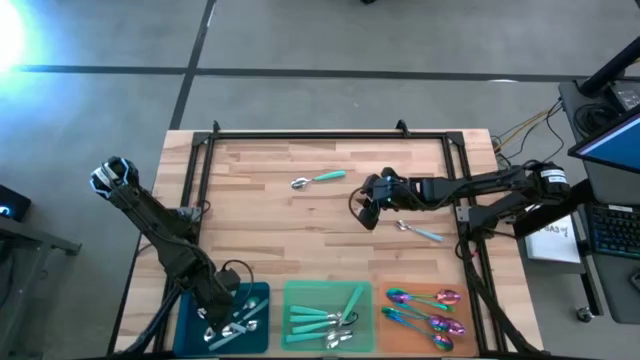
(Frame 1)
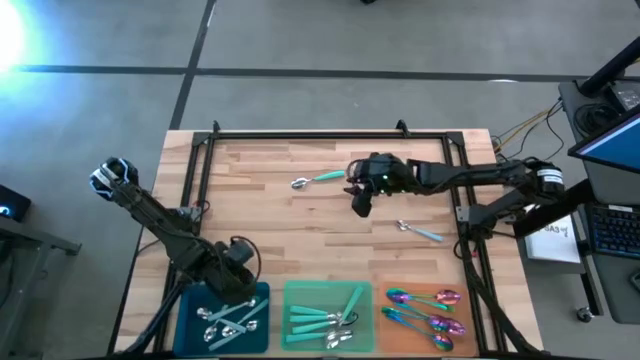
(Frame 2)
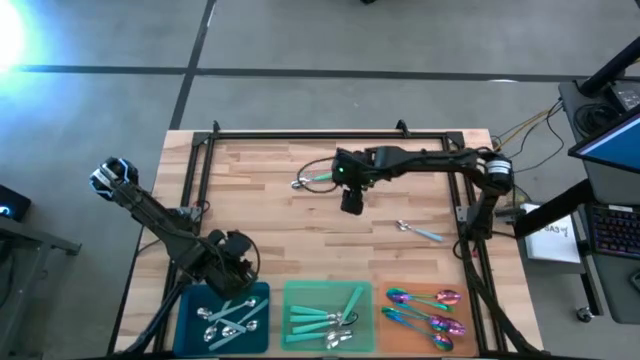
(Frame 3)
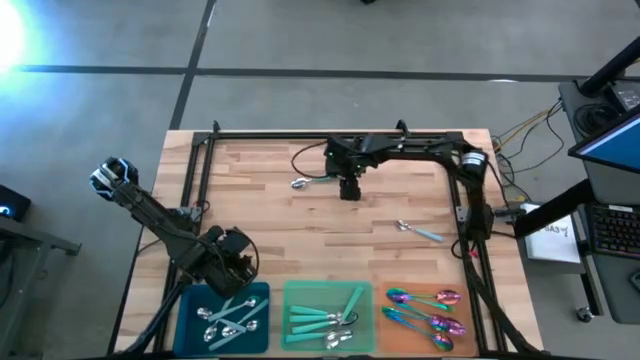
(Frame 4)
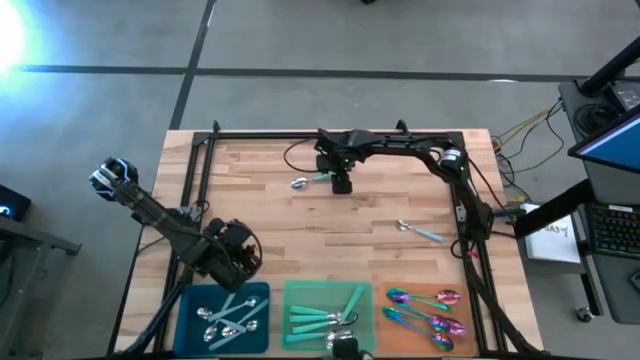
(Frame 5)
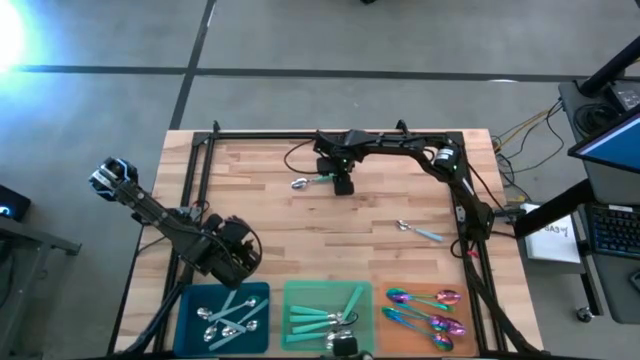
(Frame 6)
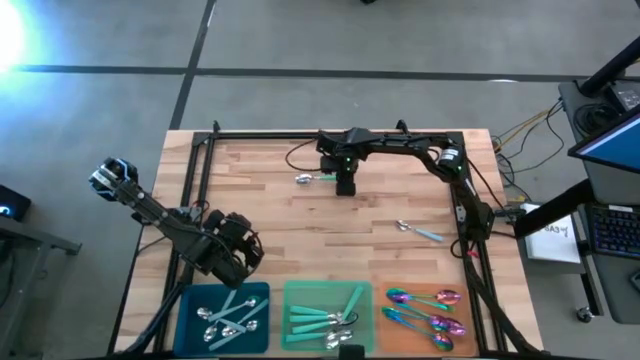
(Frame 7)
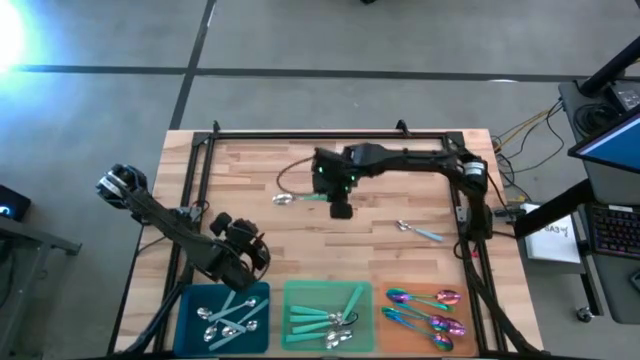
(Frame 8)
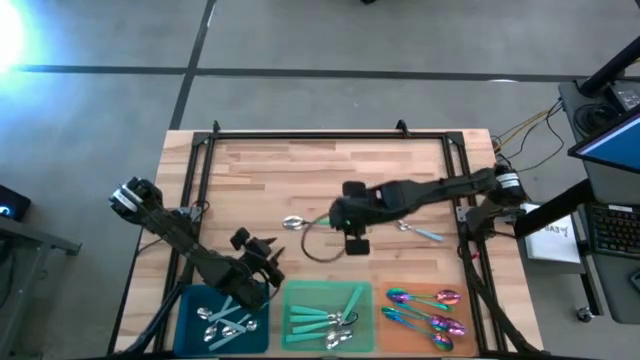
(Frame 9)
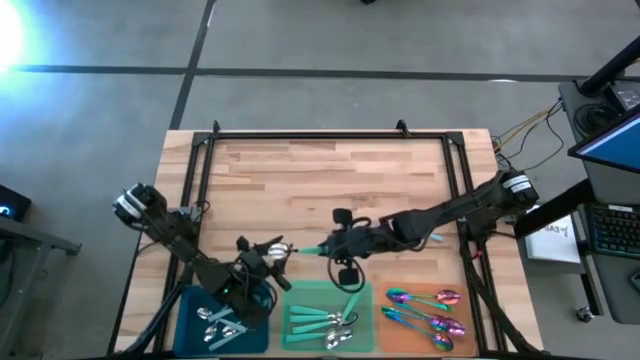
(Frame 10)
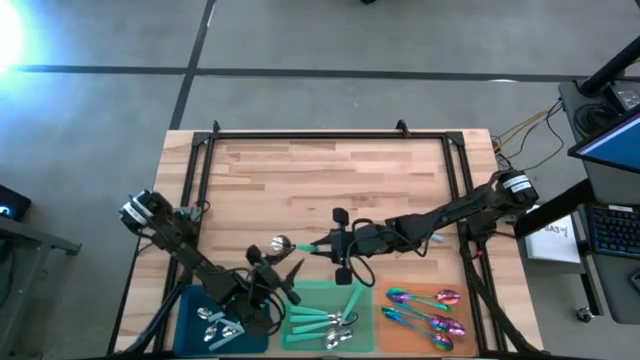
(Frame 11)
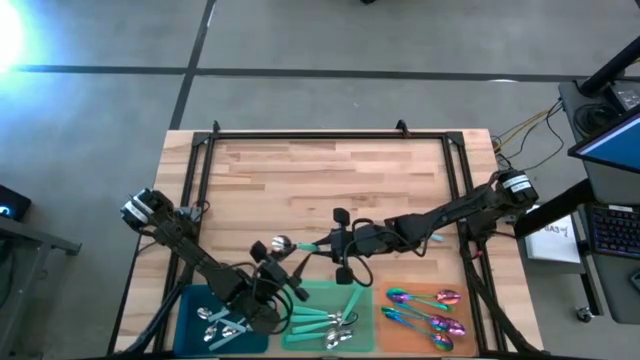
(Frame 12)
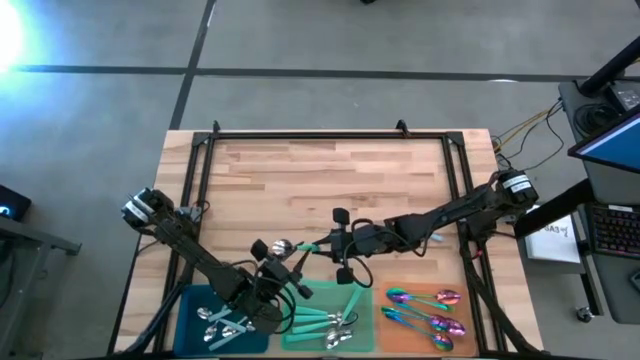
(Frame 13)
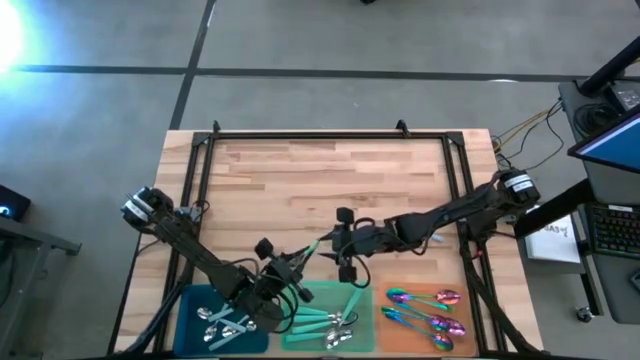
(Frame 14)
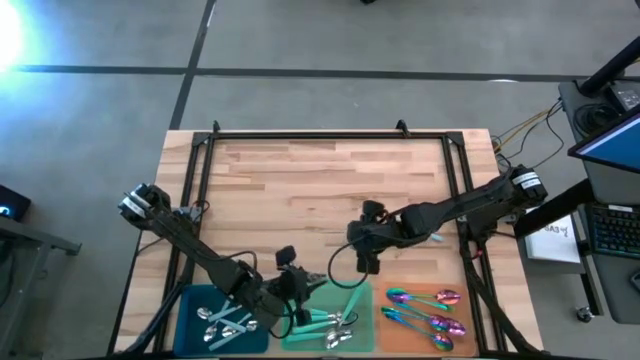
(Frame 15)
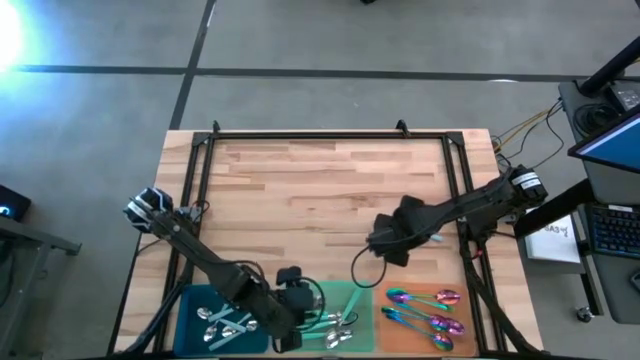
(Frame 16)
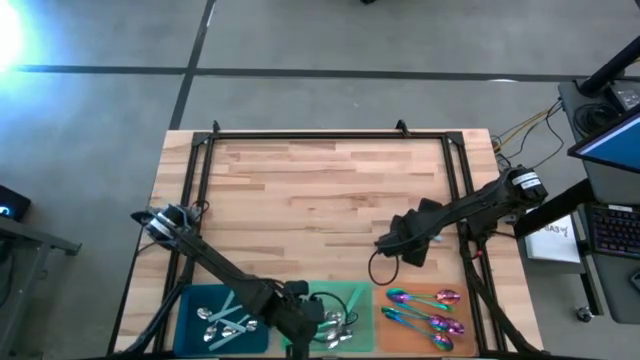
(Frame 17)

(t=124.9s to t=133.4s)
Task: Sort silverware by color (type)
Put the light green spoon into the light green bin

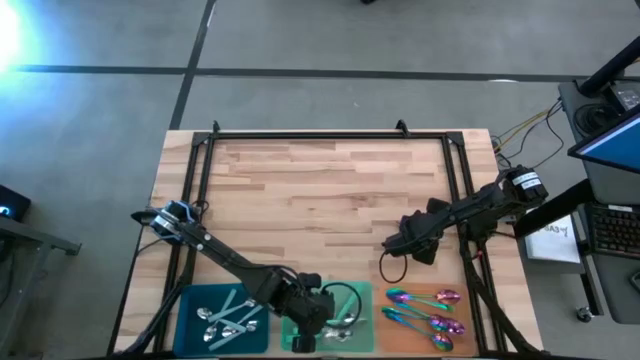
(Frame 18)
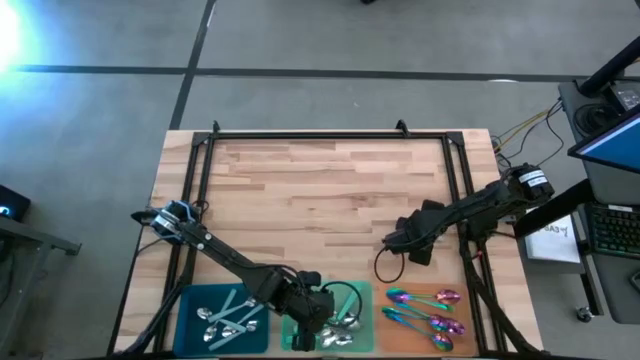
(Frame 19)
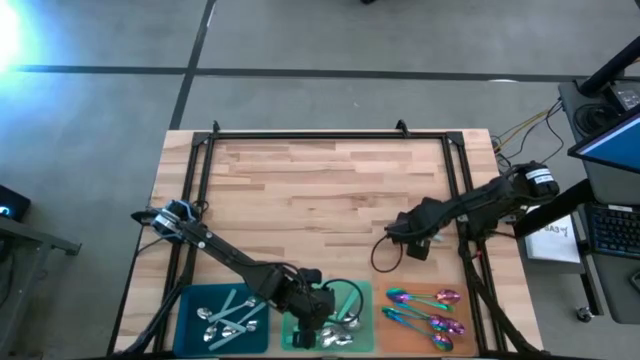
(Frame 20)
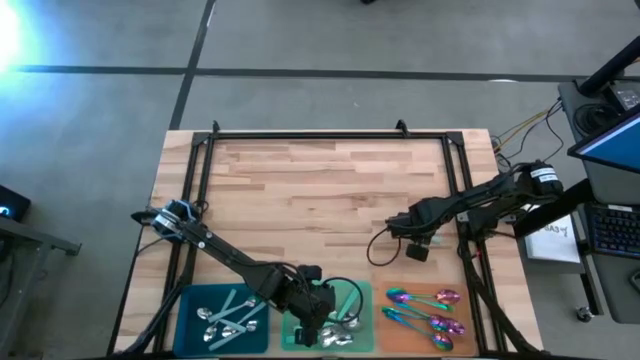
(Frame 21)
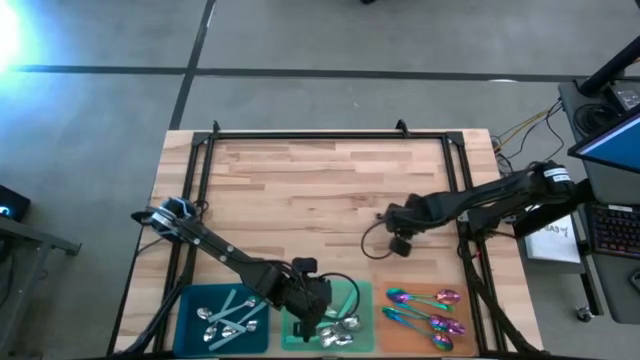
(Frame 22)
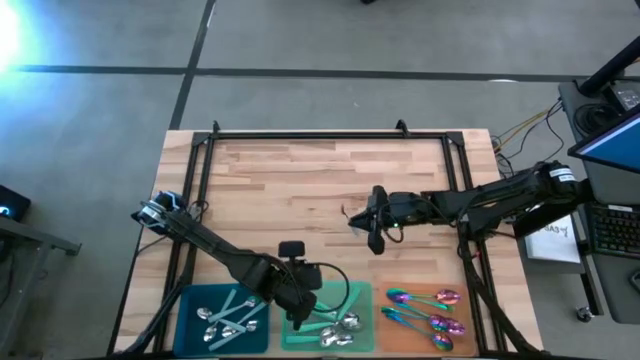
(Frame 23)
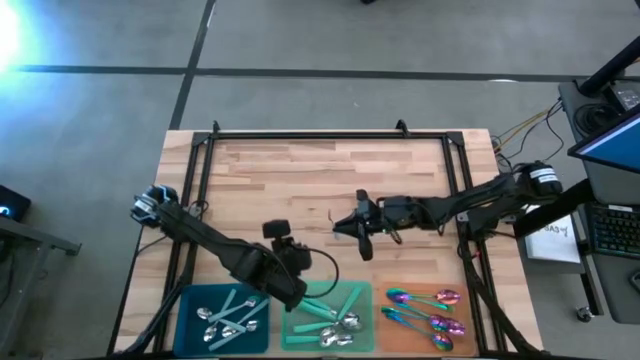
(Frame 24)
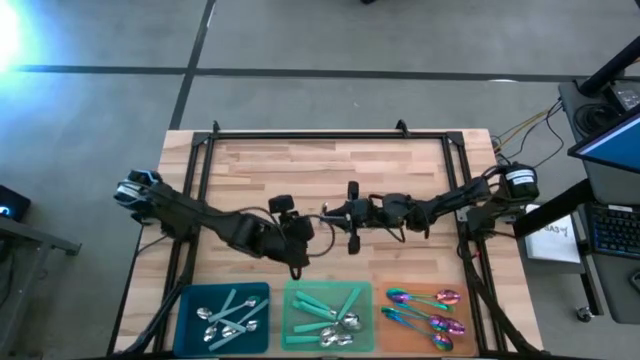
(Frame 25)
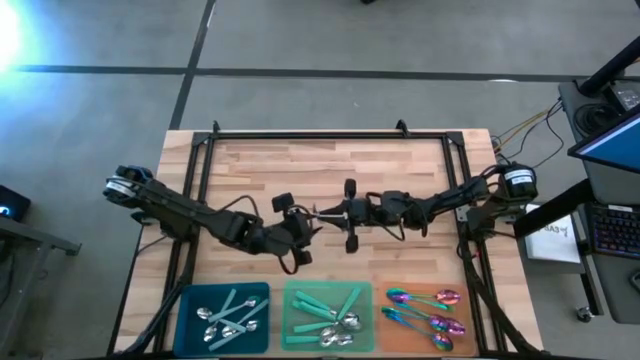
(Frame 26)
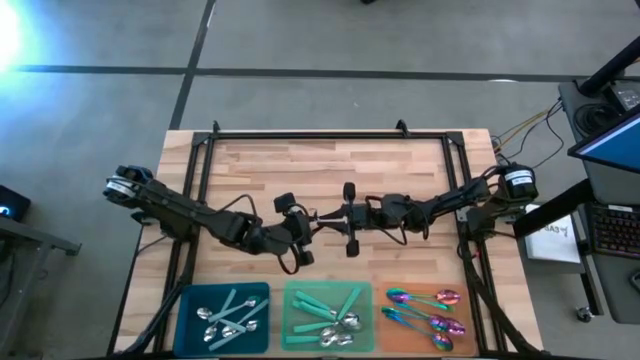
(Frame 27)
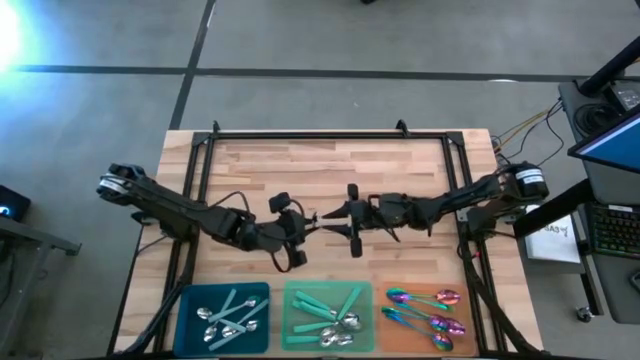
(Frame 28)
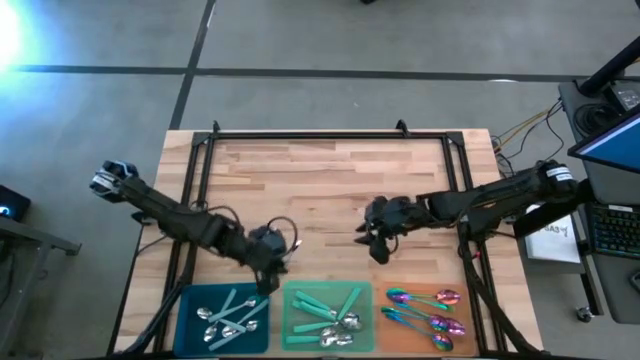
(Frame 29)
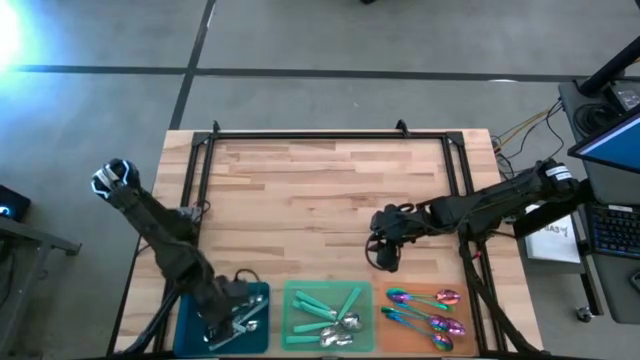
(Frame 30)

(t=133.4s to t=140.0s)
Put the light blue spoon into the blue bin
